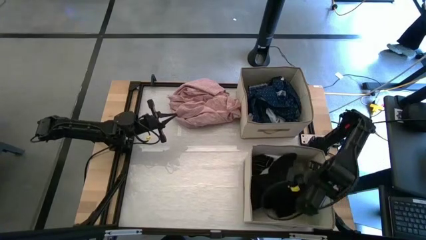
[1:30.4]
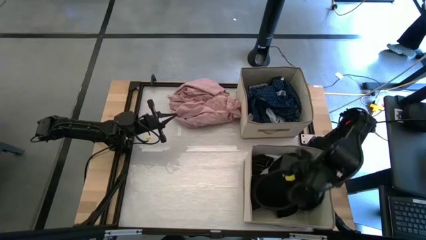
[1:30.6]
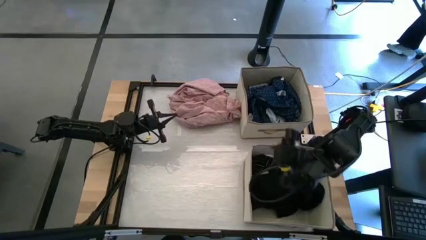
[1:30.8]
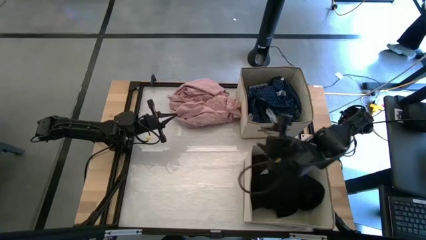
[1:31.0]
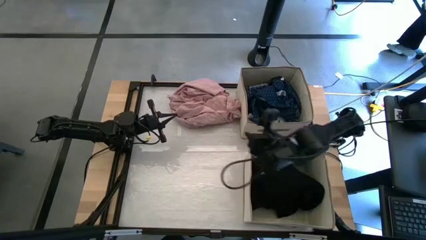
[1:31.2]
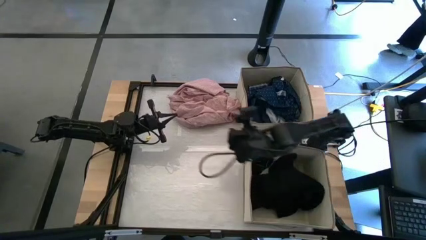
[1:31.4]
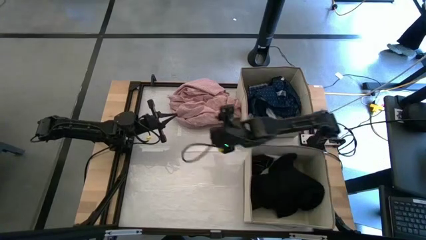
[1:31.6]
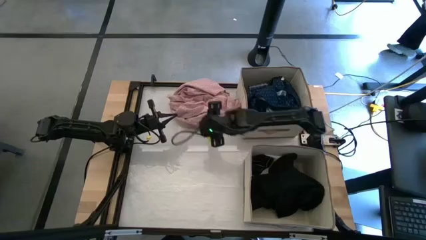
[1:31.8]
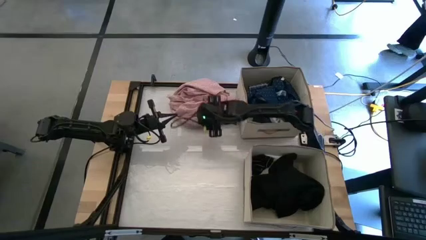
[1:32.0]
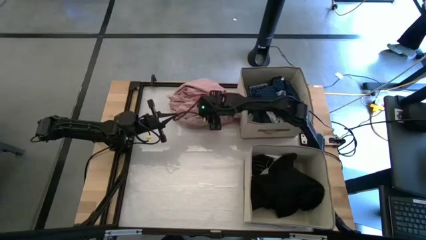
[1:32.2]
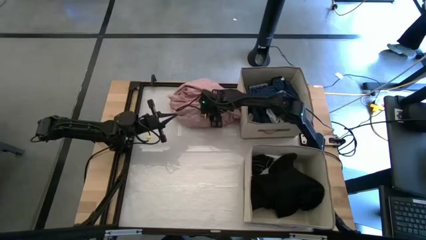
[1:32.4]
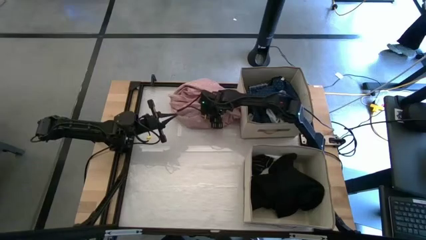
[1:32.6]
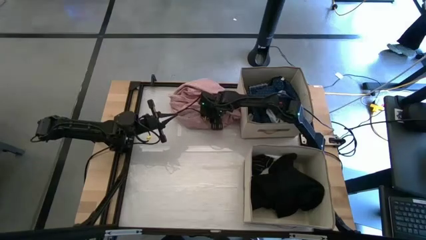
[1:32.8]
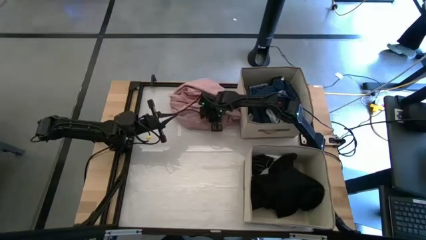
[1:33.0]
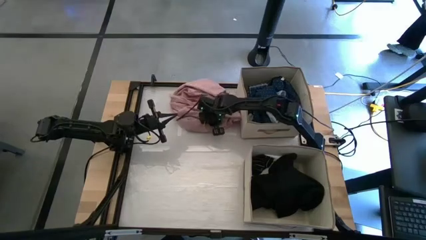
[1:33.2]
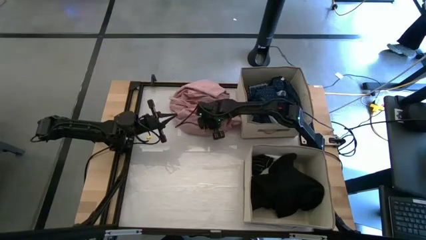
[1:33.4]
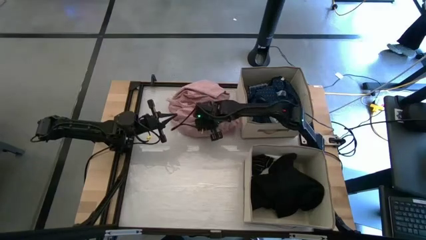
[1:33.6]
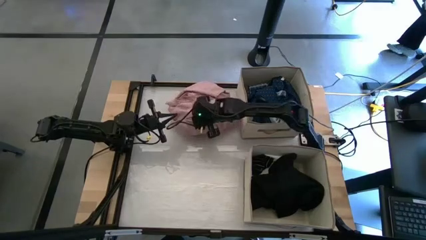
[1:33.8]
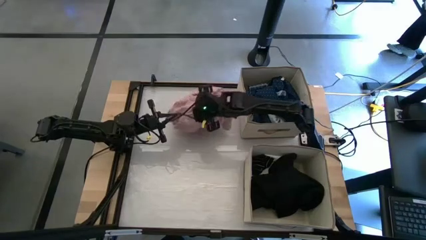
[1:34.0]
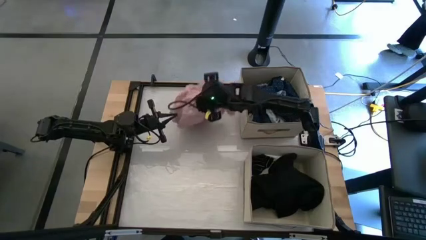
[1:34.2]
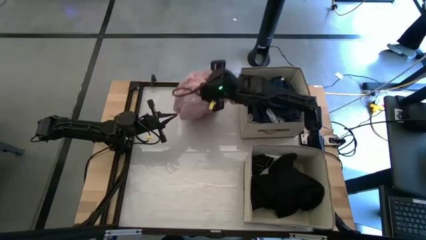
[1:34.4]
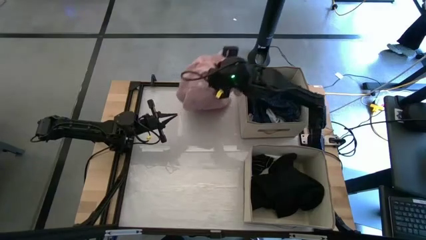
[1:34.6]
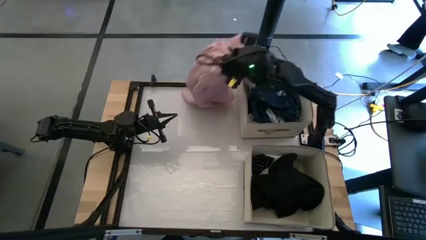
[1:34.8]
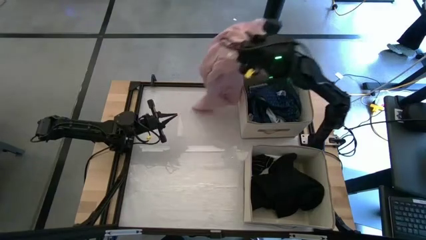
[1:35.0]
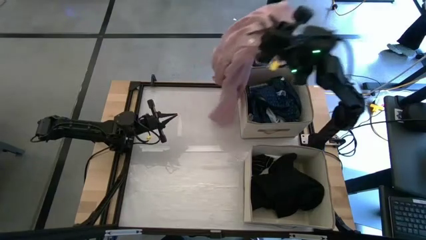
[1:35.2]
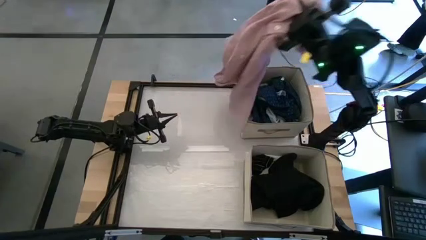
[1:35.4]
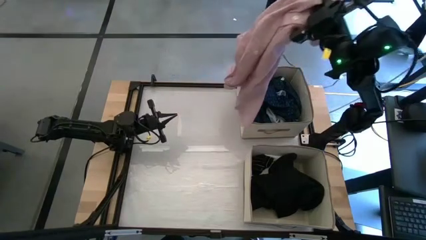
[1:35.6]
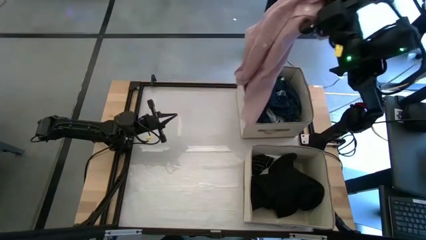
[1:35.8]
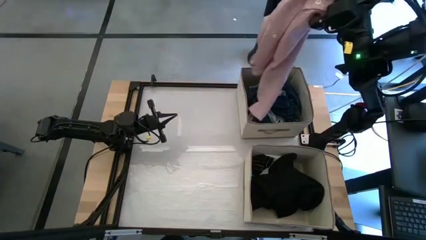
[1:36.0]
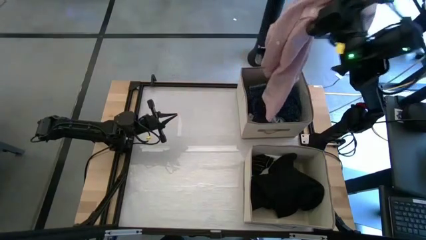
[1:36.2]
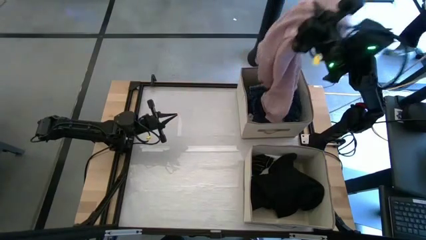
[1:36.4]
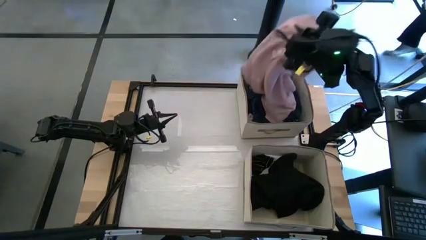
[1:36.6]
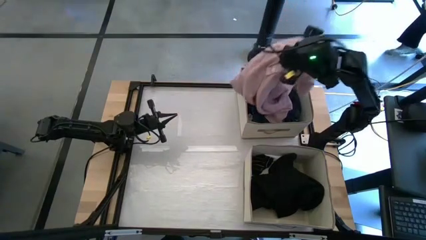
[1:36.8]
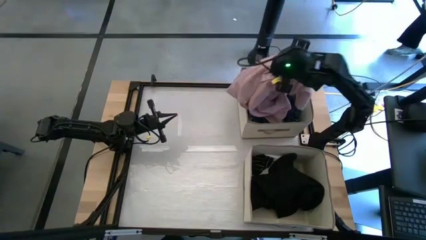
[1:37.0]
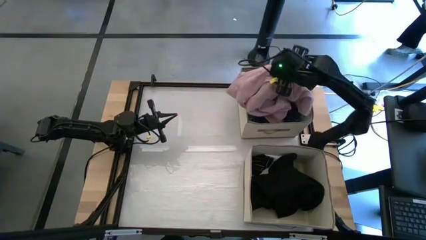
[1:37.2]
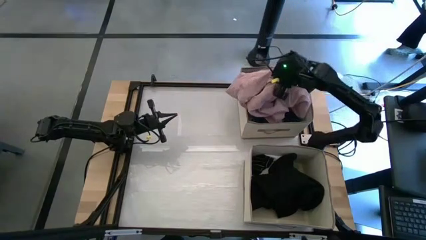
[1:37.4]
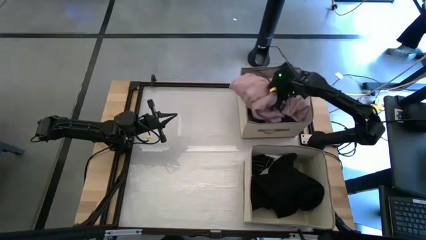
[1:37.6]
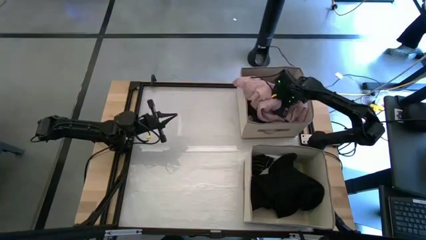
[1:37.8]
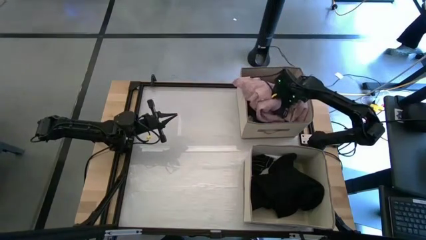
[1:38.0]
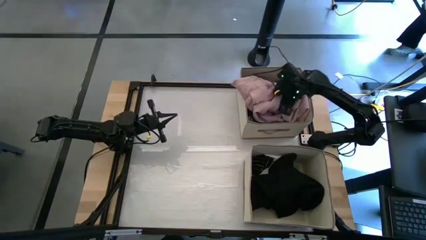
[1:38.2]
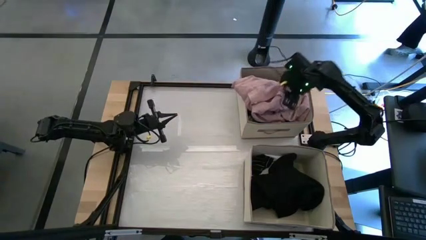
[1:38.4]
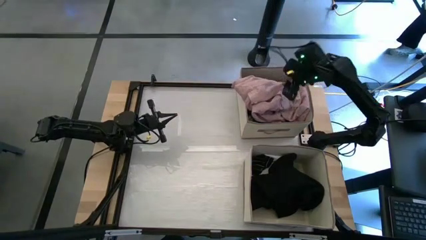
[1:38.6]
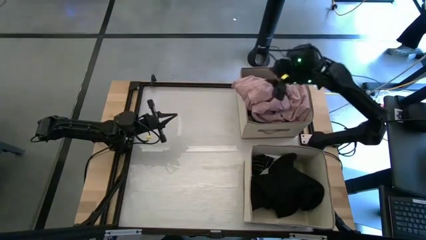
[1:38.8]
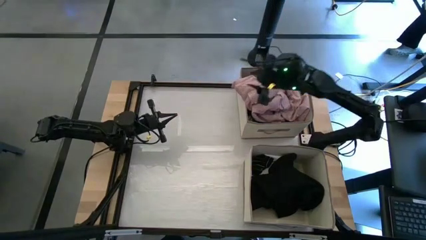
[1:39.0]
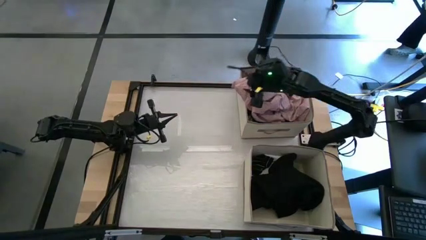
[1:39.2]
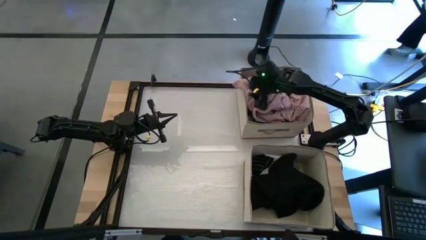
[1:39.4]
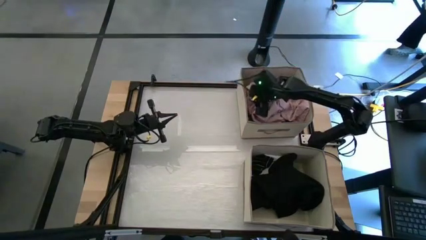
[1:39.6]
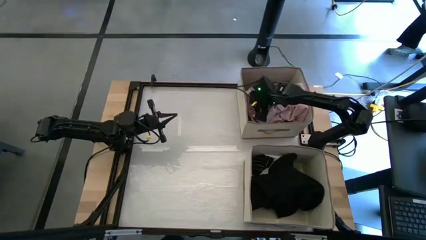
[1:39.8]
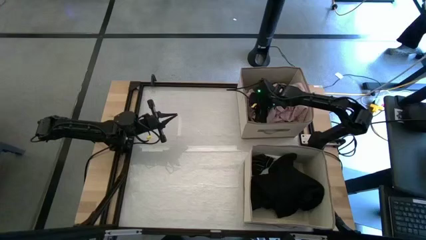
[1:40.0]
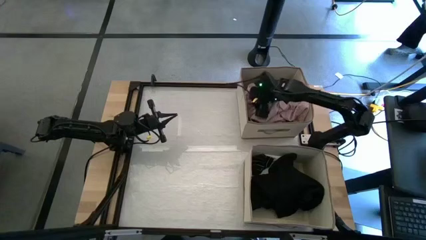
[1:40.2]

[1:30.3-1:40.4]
Task: Sort clothes
Put the pink polo shirt into the top laundry organizer

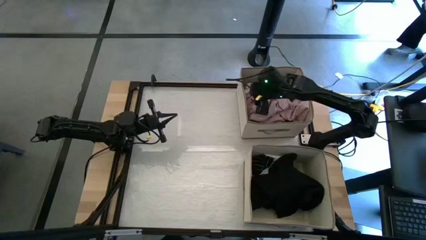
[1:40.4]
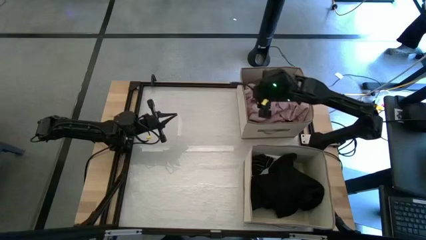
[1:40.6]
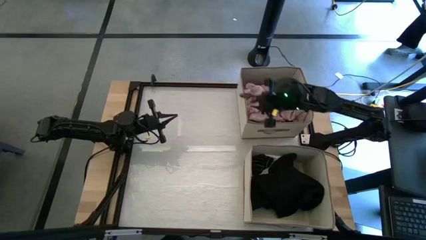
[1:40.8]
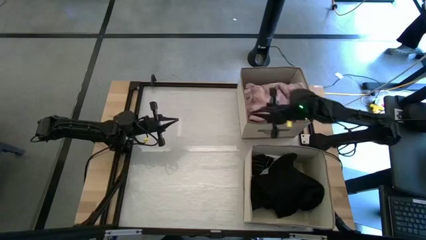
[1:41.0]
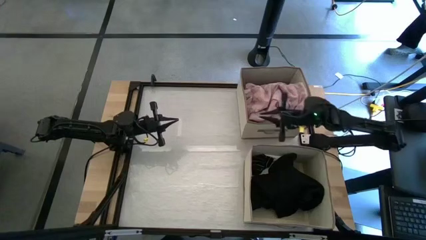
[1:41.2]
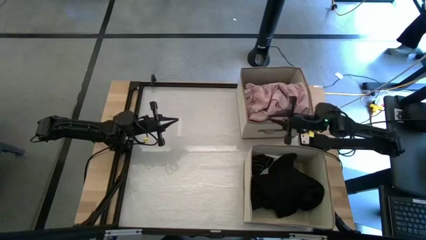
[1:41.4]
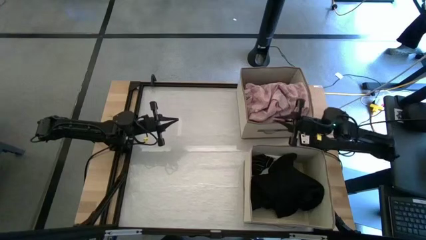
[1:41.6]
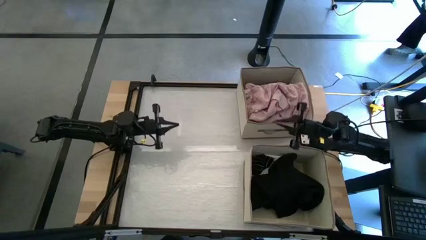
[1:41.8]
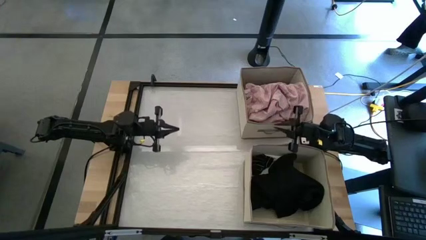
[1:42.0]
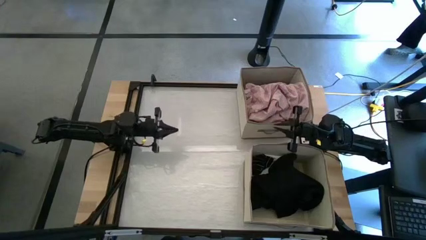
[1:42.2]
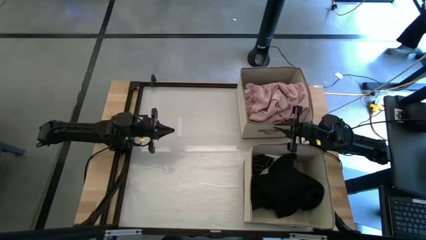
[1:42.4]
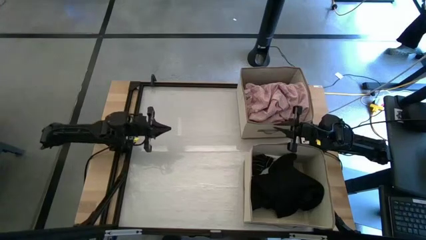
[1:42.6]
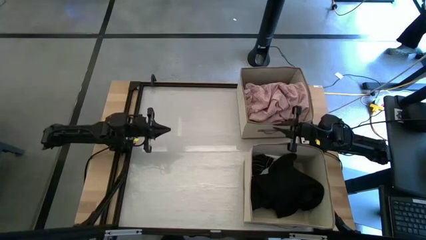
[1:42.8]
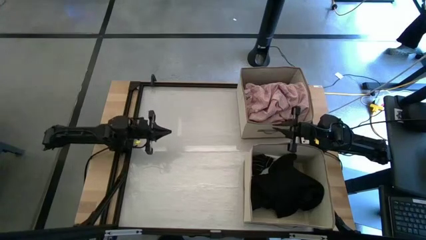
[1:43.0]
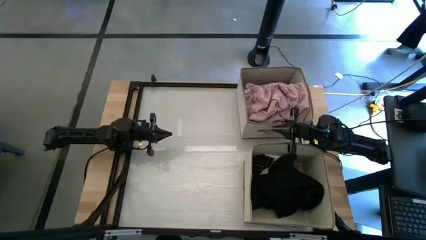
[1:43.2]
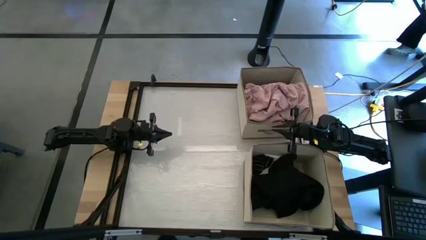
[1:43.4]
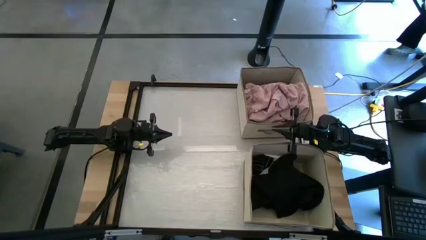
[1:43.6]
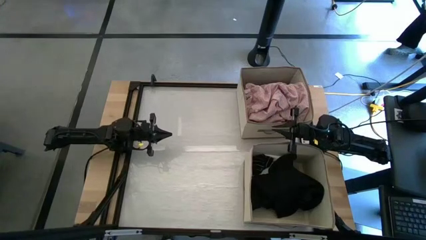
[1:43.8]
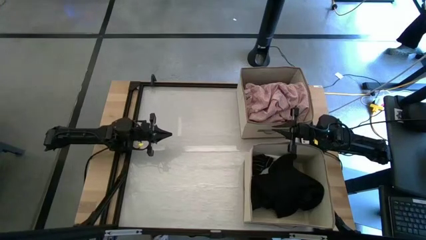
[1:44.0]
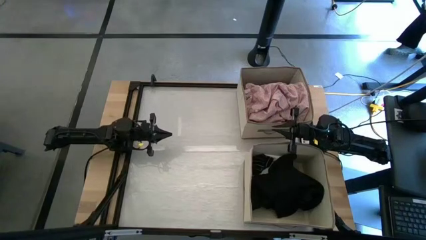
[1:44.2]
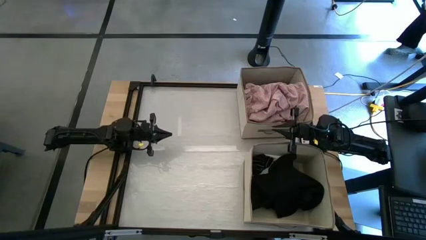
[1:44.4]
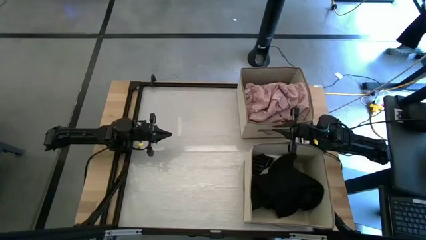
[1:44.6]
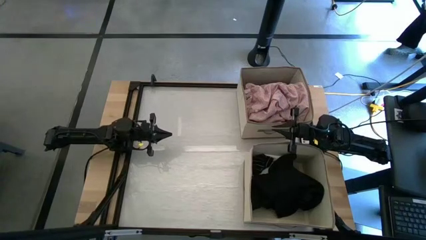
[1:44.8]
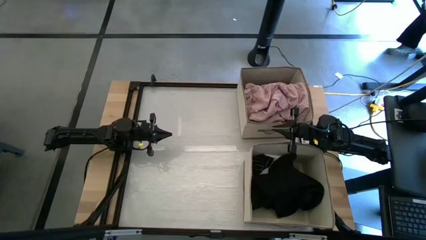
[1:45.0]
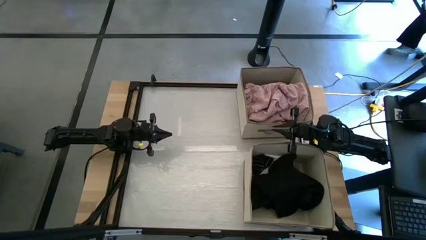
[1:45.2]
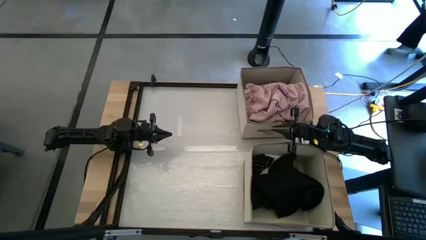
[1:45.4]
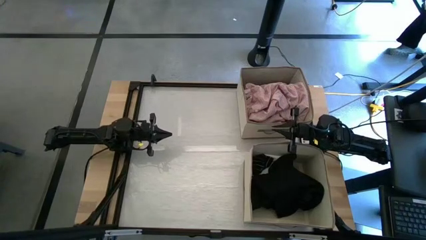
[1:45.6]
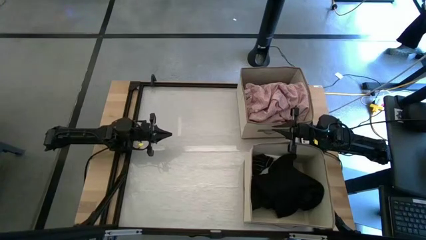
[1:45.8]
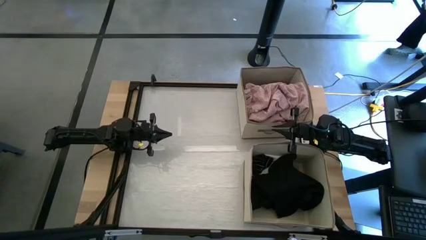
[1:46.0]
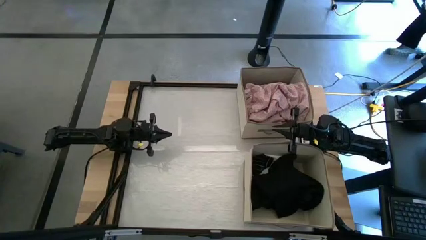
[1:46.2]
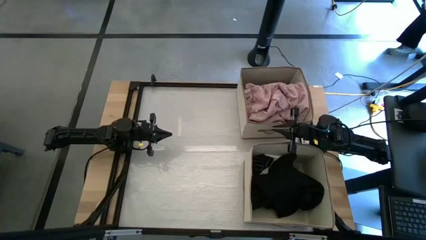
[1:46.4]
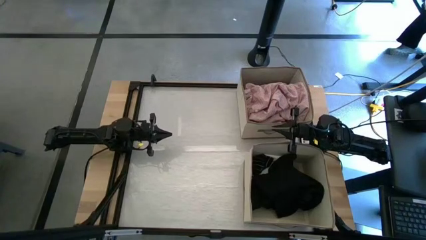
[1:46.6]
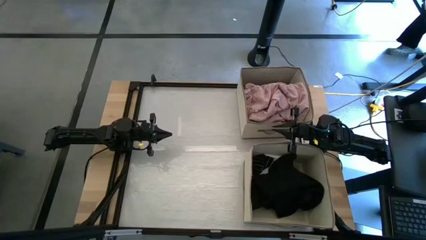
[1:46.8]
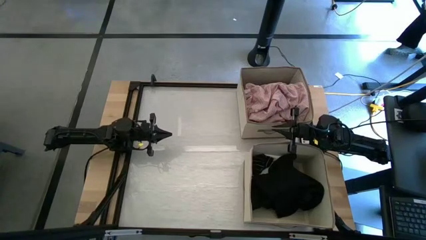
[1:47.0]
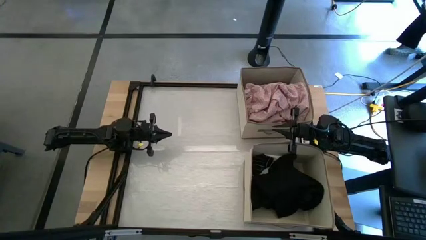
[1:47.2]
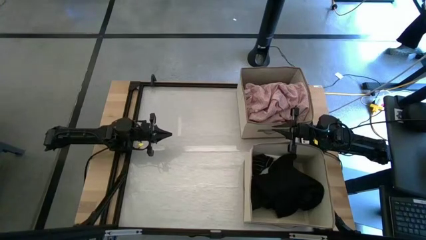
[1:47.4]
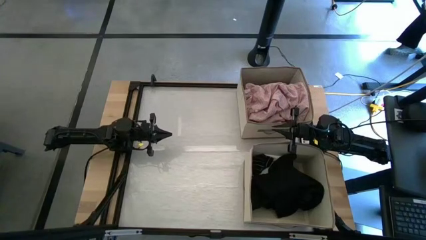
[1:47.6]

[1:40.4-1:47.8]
Return to Home Position
